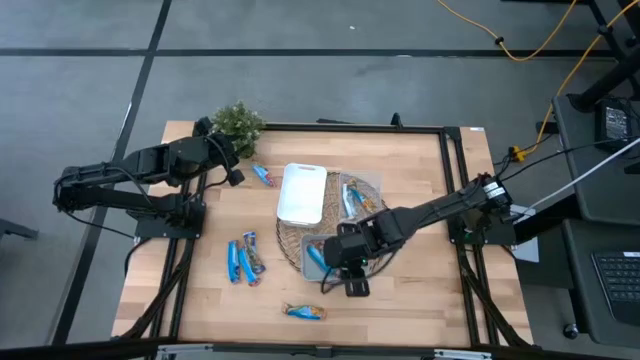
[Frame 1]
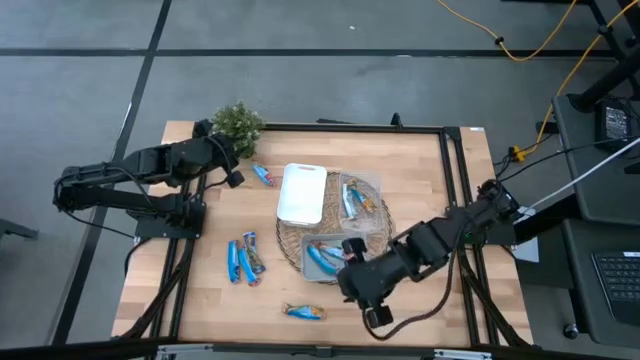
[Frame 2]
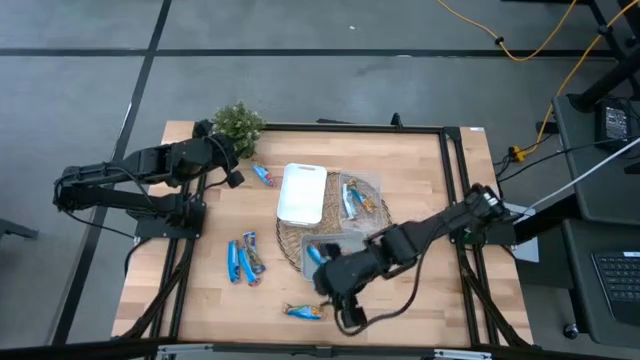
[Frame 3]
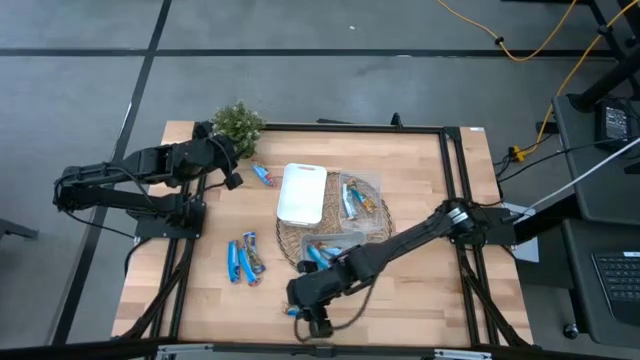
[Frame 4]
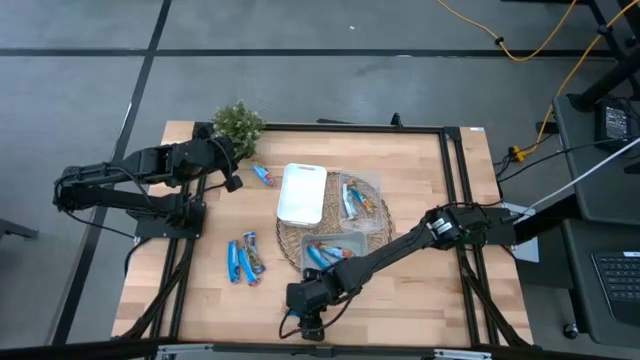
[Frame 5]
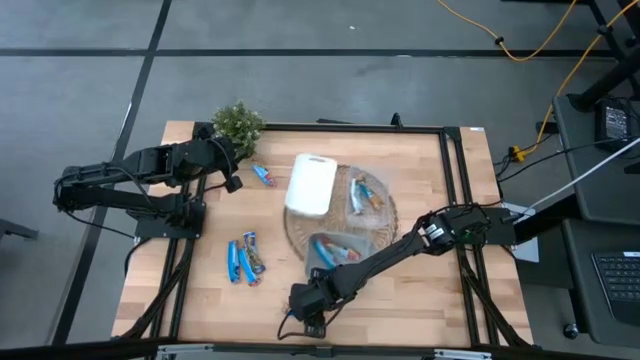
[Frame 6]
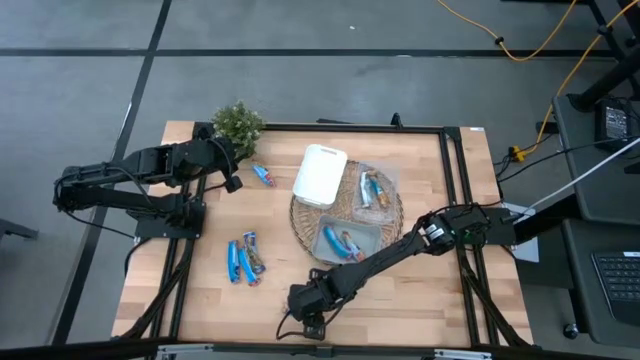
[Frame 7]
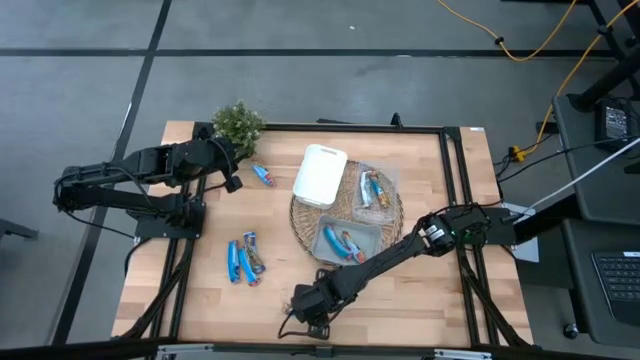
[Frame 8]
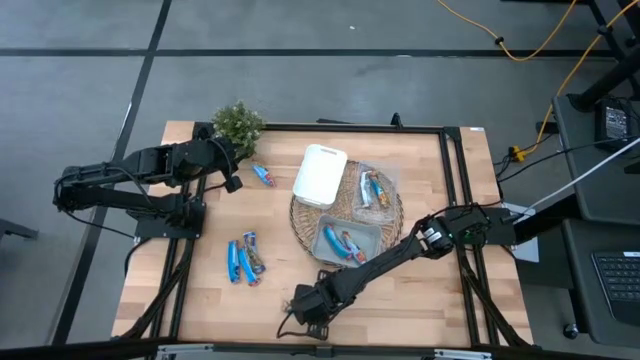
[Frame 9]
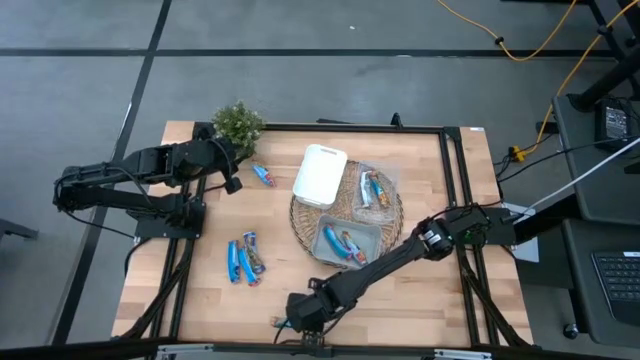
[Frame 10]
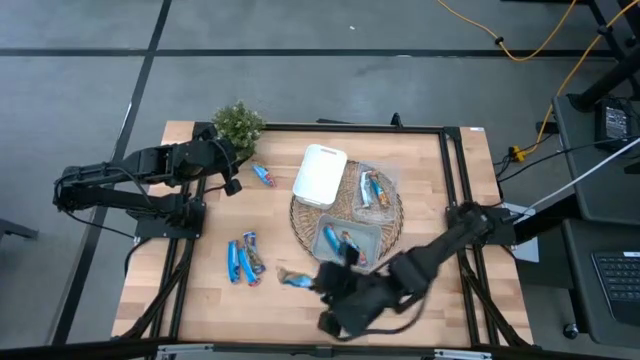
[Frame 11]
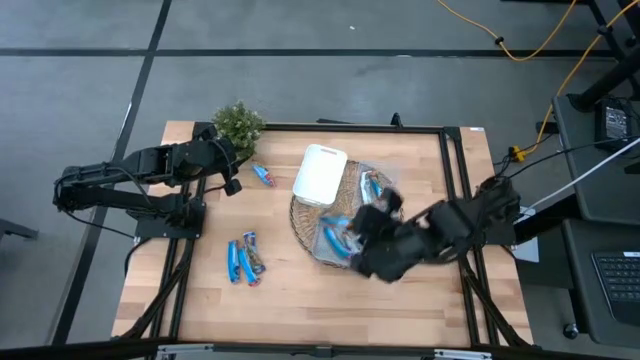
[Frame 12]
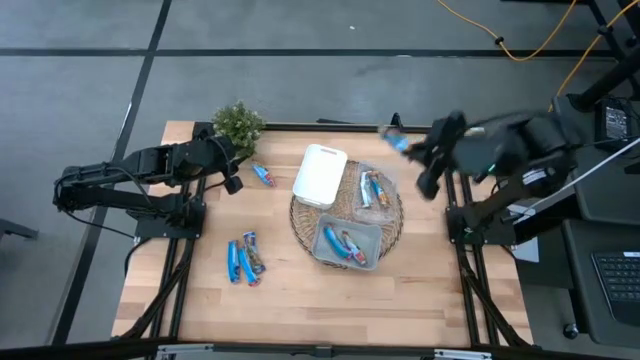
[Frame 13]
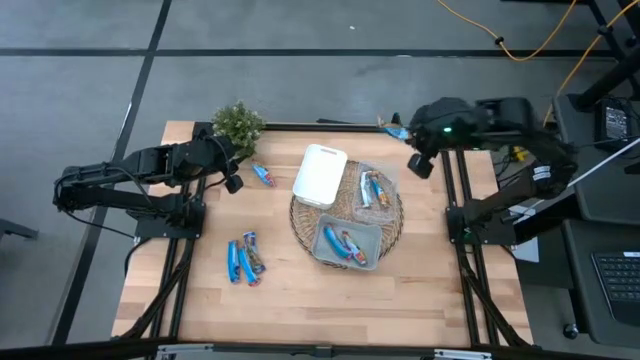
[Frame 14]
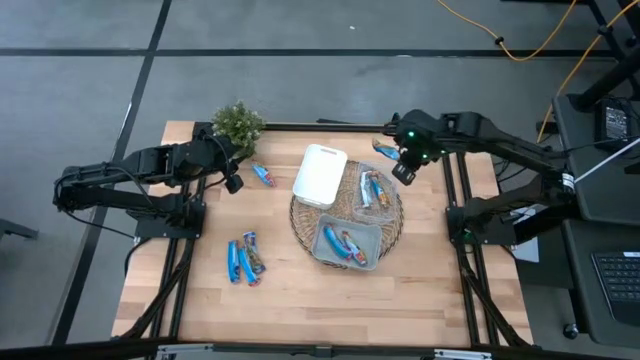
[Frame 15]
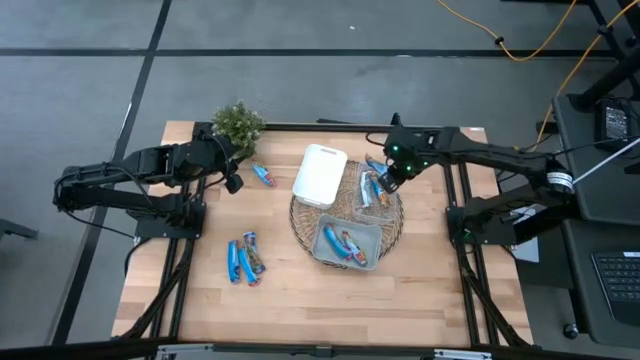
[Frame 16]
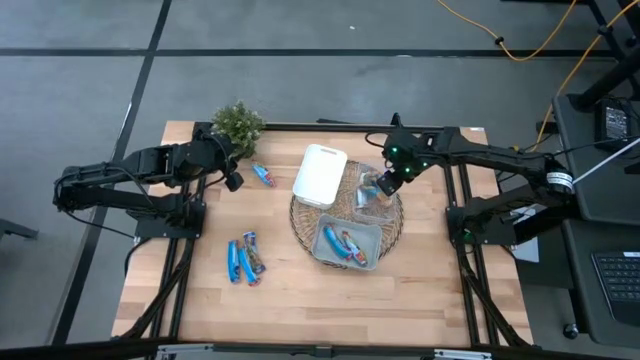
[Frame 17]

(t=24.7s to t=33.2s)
Task: Pick and place Granola Bars by type
Put the yellow granola bar into the transparent bin

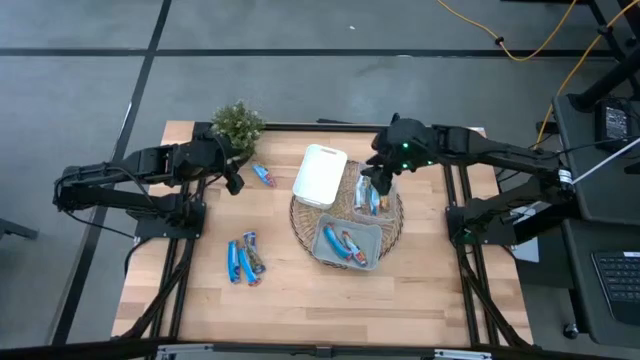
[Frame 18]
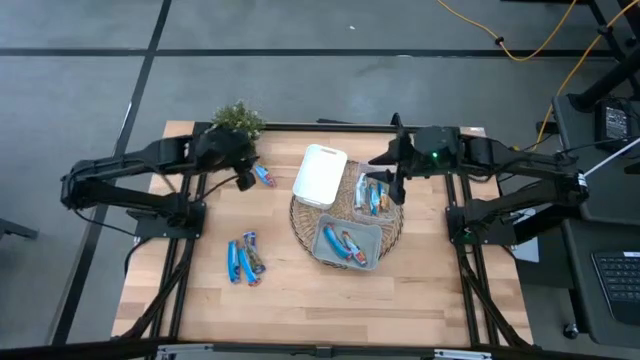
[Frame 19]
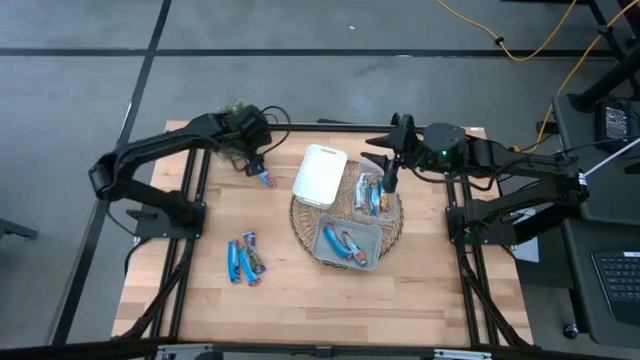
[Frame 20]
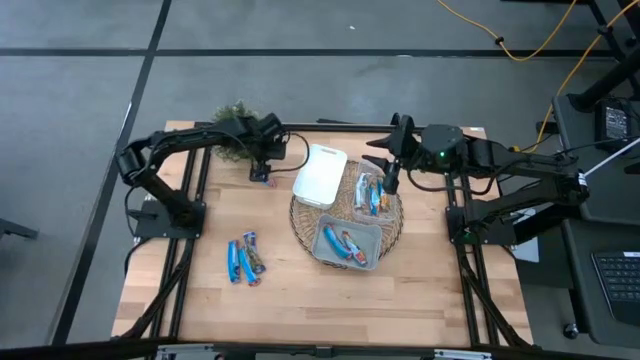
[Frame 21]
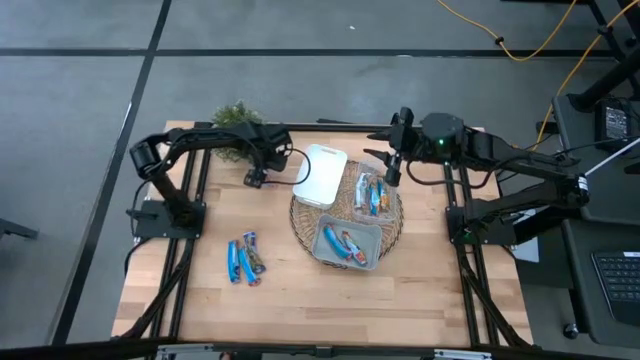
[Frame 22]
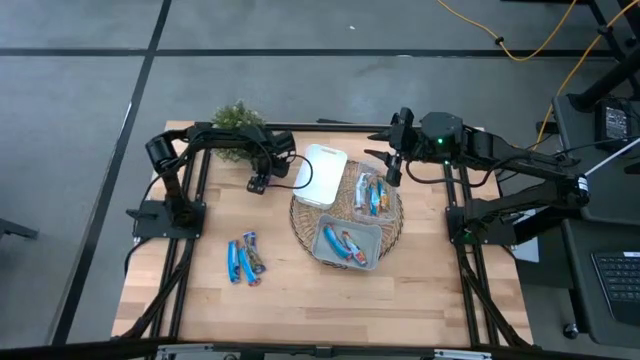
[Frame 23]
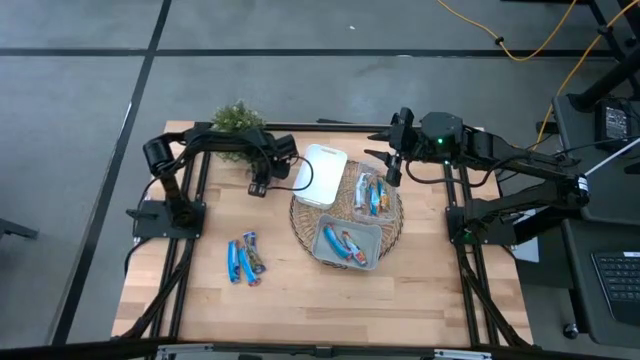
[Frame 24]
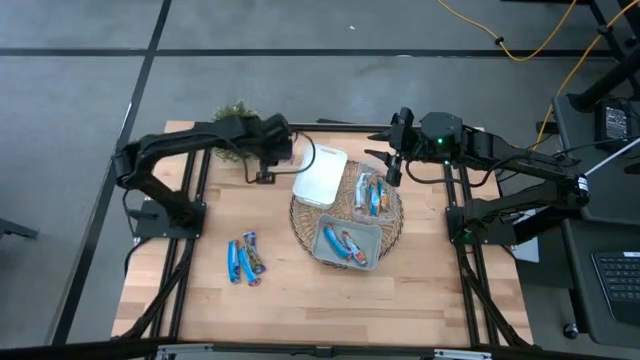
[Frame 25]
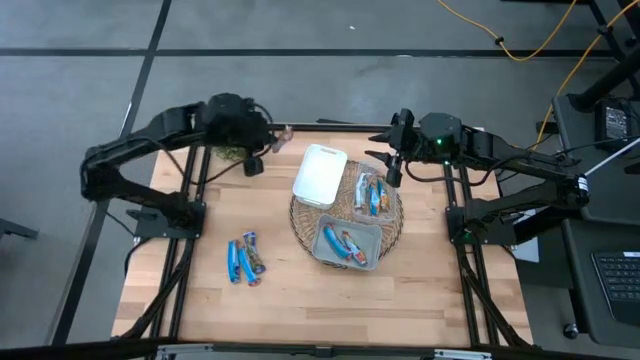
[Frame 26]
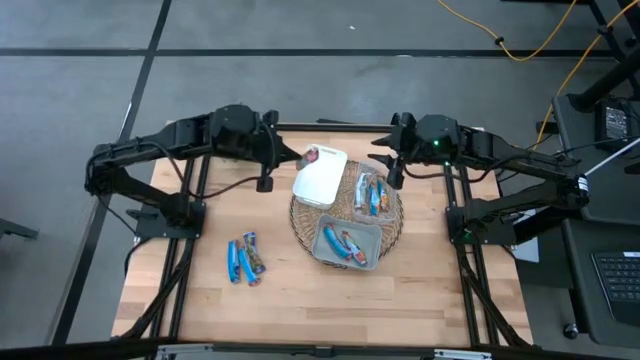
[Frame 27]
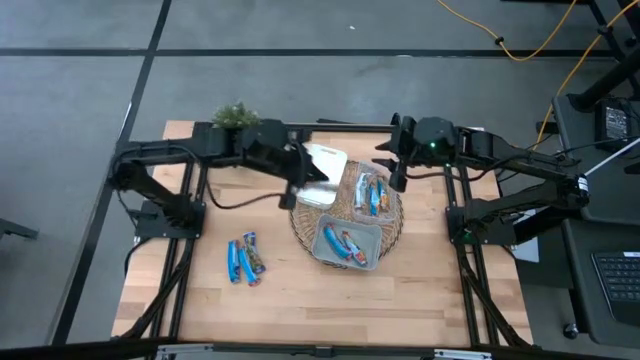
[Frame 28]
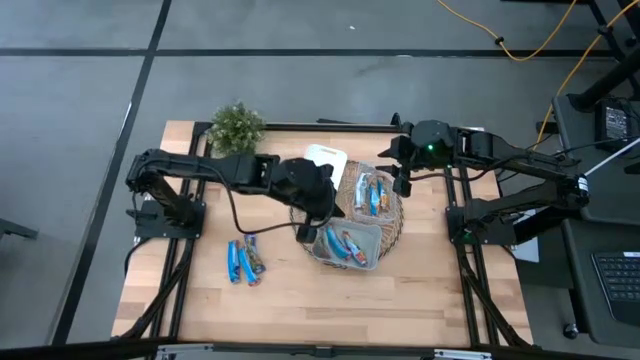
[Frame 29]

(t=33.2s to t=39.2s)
Put the top red granola bar into the gray bin

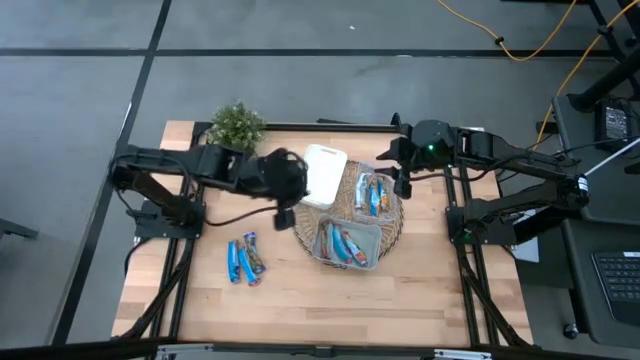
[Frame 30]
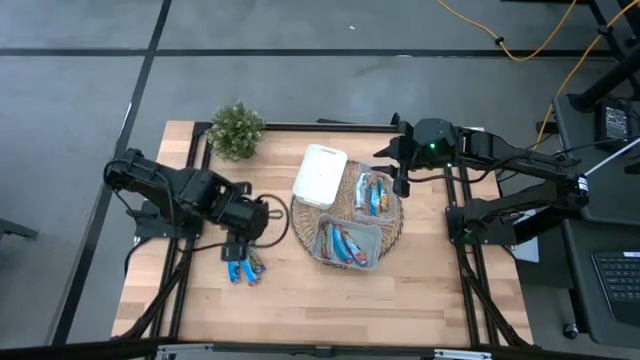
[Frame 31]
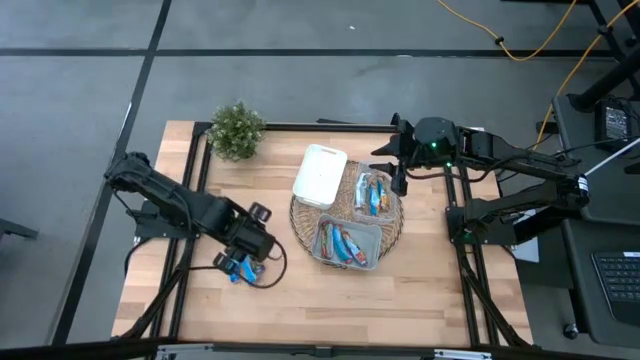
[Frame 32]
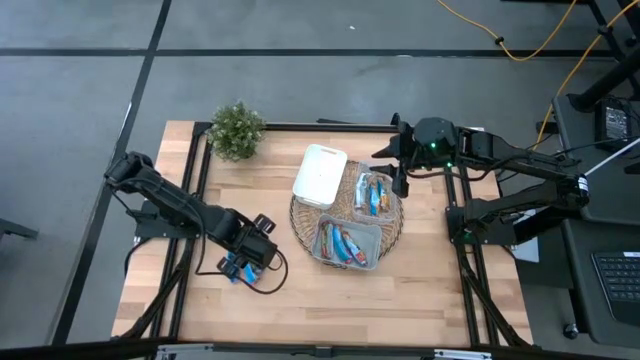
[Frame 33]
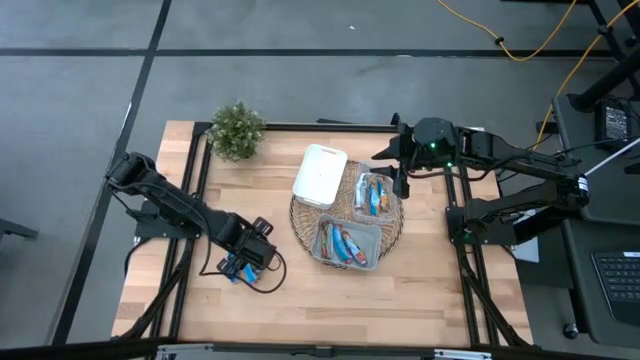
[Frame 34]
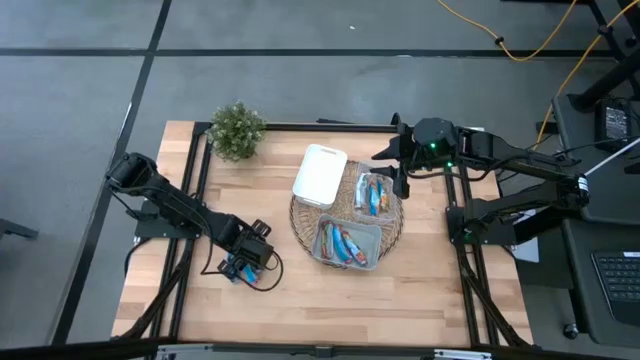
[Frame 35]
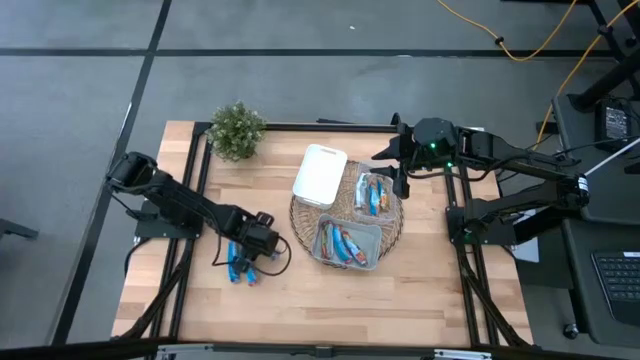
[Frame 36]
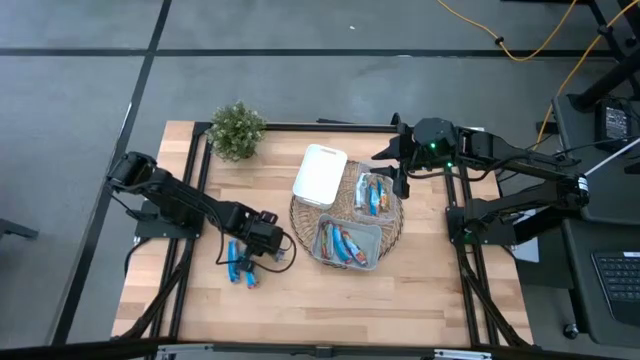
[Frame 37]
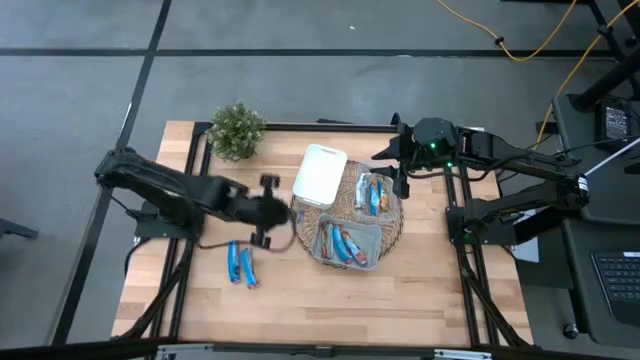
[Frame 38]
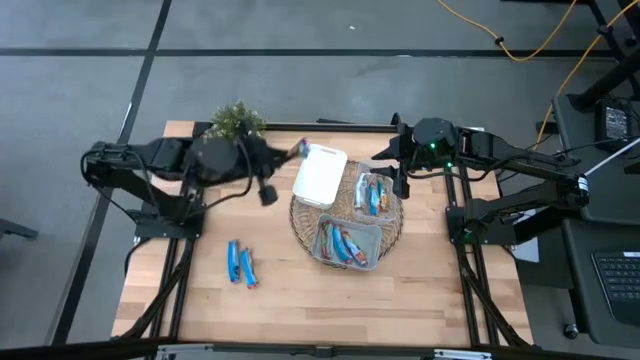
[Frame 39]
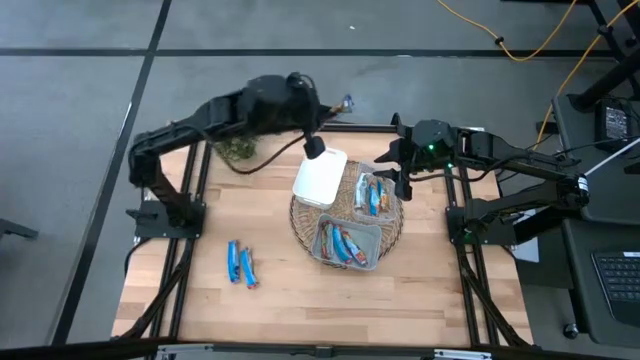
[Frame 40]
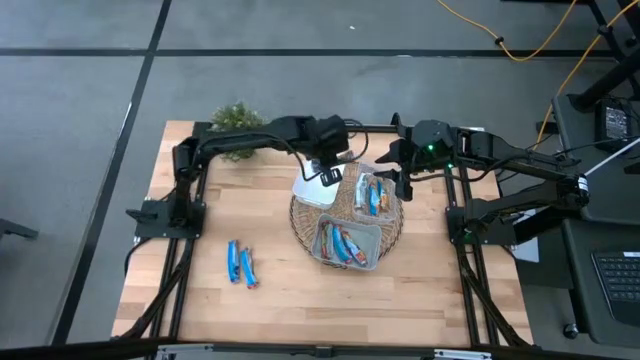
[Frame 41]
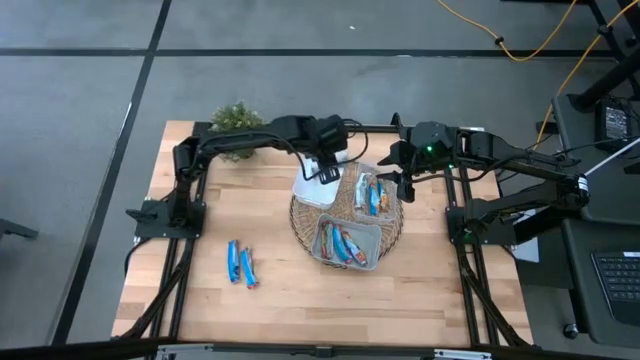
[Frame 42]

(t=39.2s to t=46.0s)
Put the right blue granola bar into the white bin

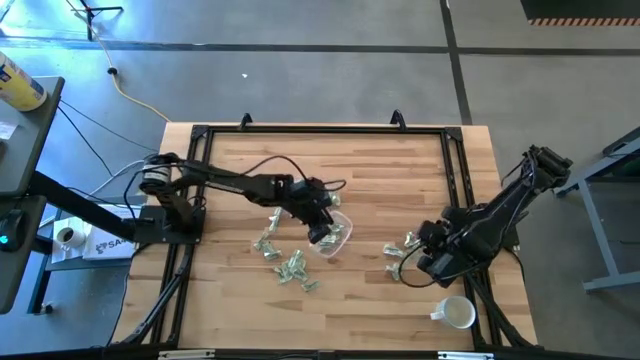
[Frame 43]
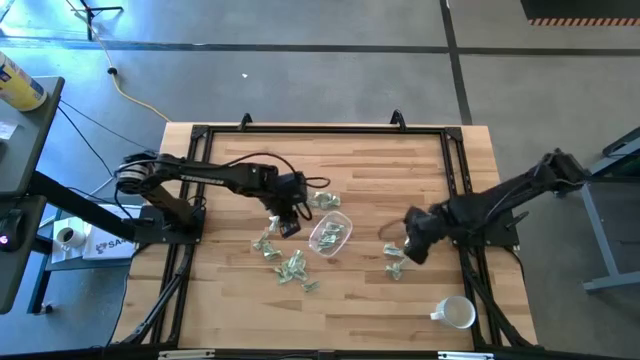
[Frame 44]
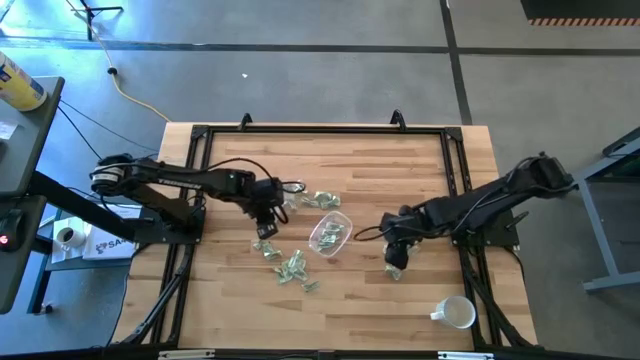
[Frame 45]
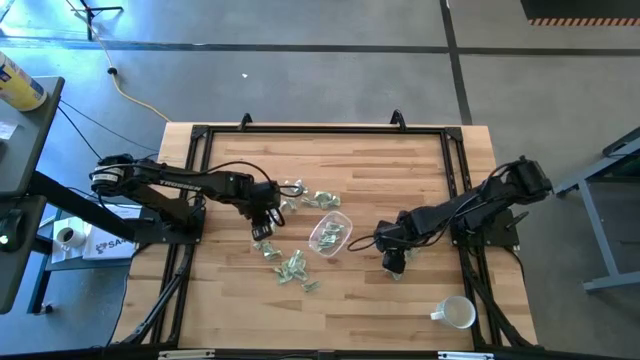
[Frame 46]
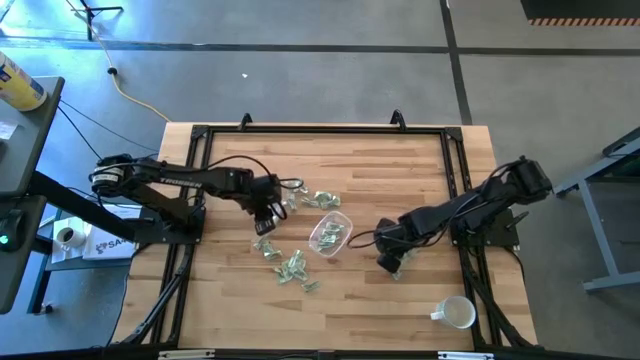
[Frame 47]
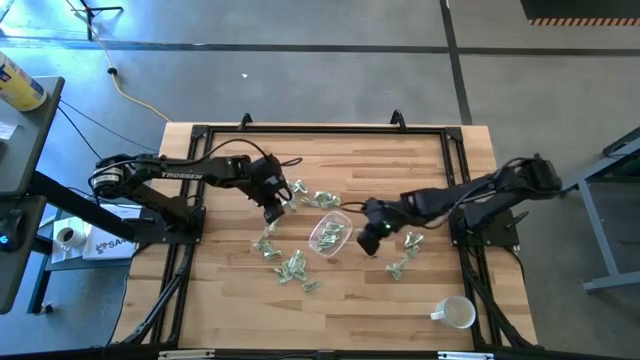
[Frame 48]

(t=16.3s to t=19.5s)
Task: Pick and place Stevia / Truvia into bins
Put the stevia packet into the transparent bin
